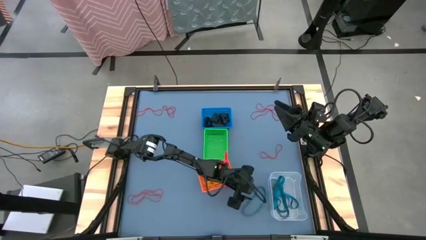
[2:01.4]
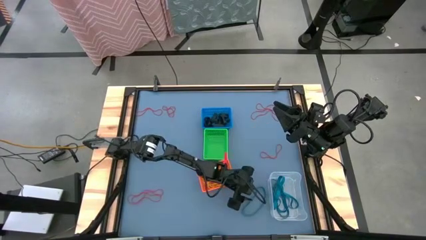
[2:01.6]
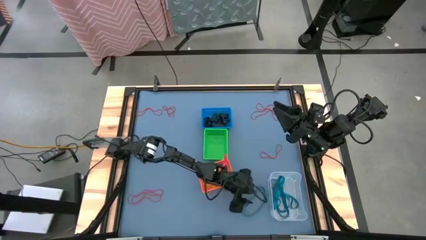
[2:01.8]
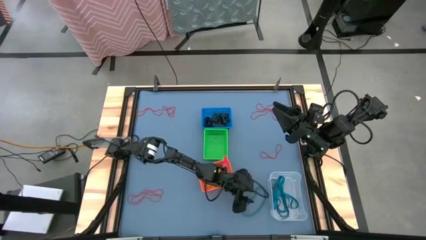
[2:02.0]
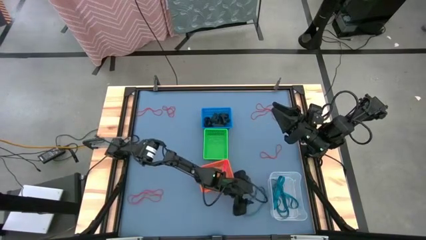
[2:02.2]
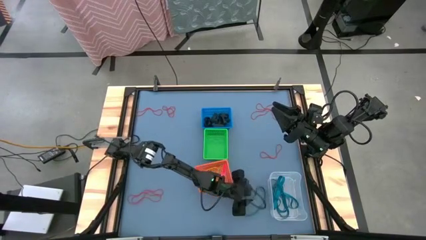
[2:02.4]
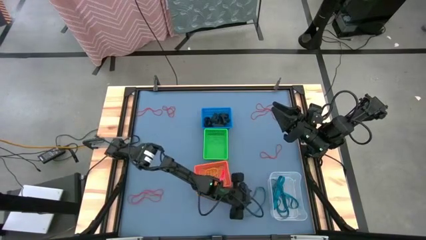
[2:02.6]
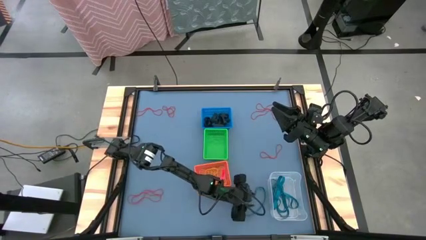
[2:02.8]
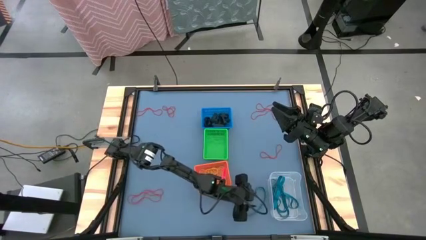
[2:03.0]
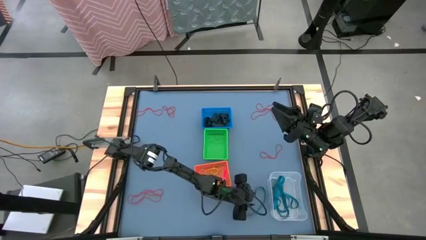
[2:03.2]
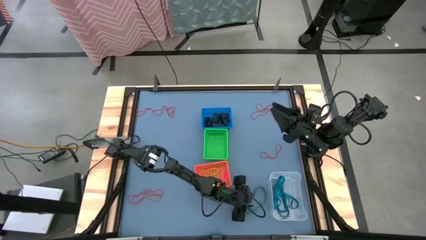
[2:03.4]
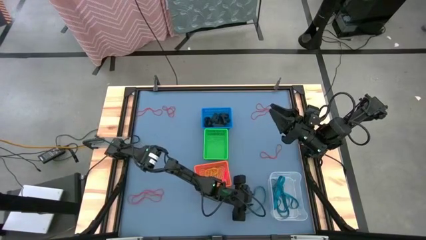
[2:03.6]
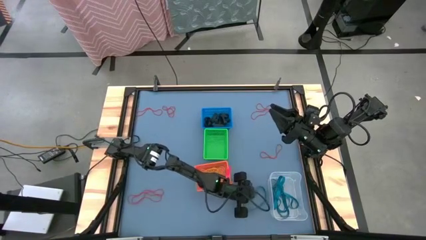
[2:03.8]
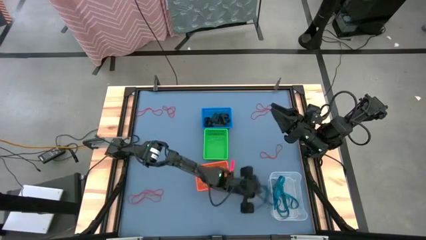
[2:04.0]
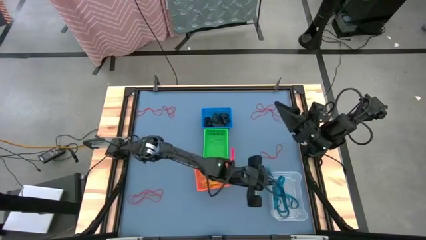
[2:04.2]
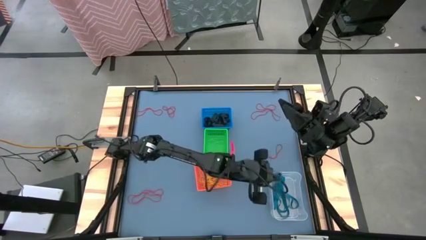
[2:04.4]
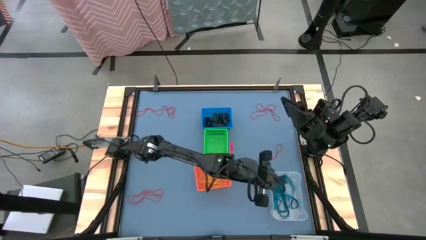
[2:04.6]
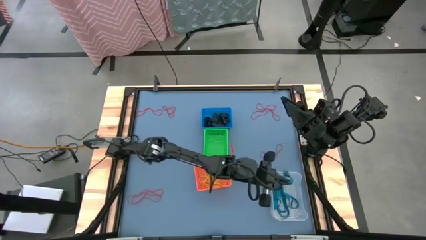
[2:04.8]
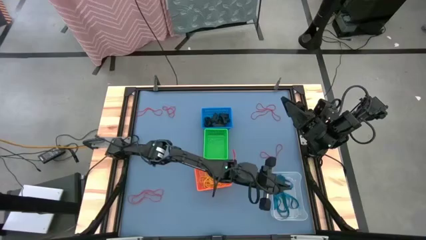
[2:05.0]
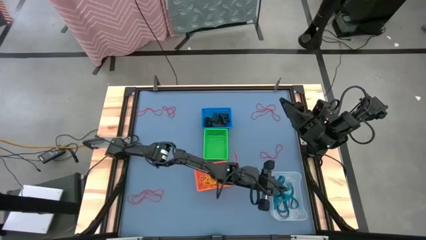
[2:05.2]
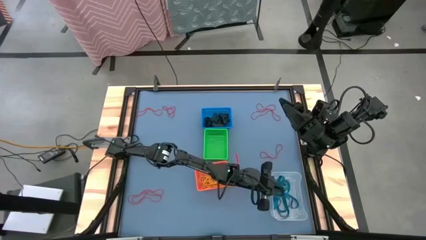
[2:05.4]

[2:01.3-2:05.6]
Task: Sort rubber bands into baskets
Put the blue rubber band into the transparent bin

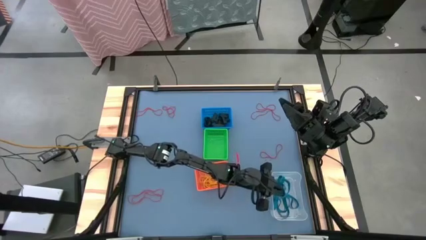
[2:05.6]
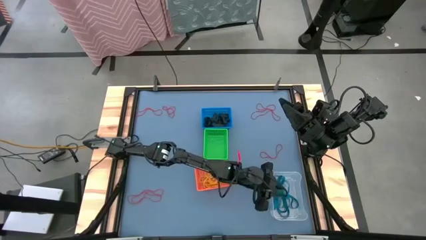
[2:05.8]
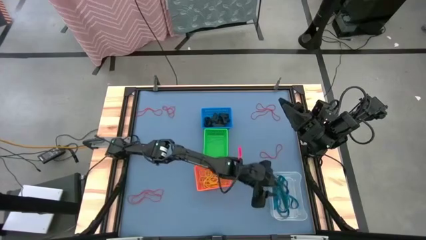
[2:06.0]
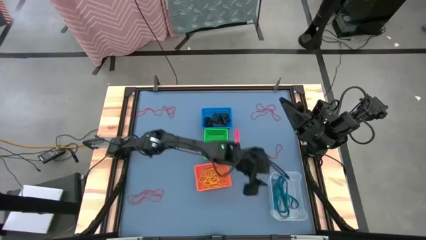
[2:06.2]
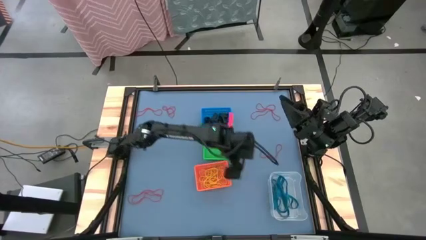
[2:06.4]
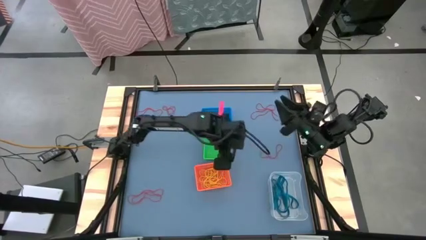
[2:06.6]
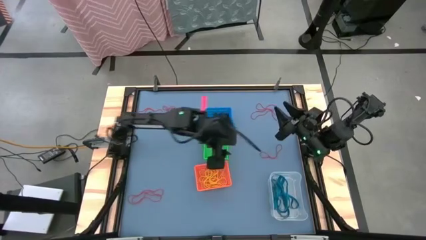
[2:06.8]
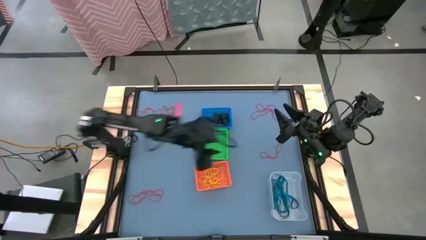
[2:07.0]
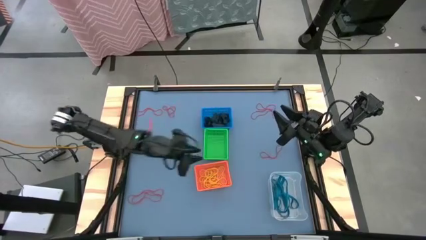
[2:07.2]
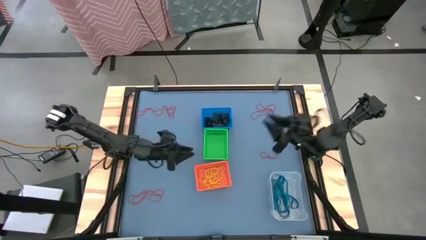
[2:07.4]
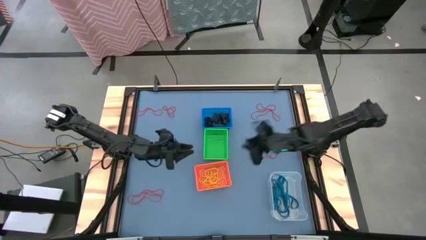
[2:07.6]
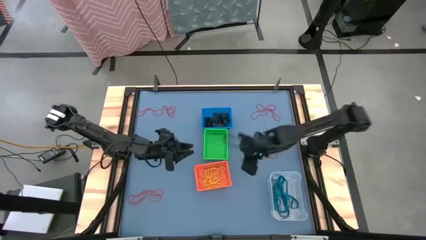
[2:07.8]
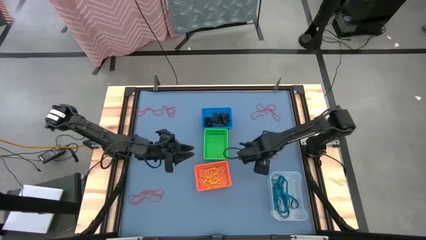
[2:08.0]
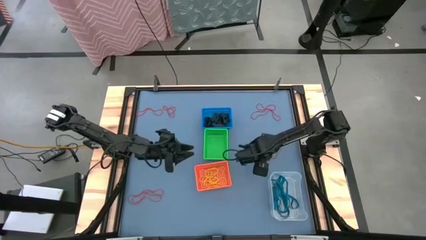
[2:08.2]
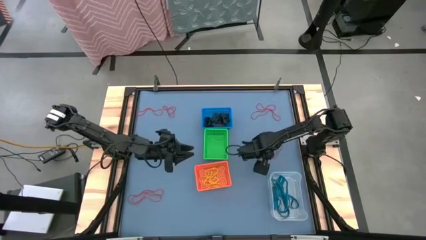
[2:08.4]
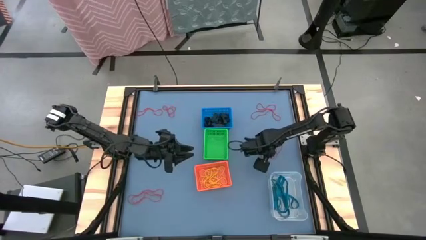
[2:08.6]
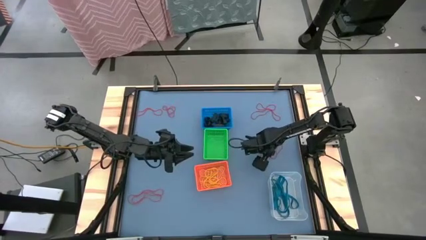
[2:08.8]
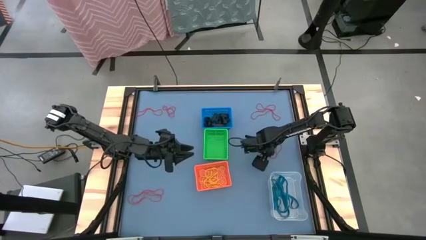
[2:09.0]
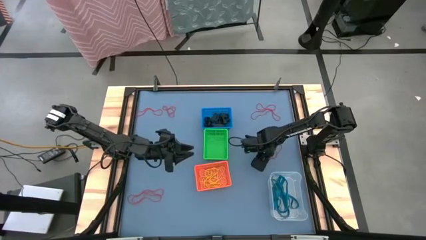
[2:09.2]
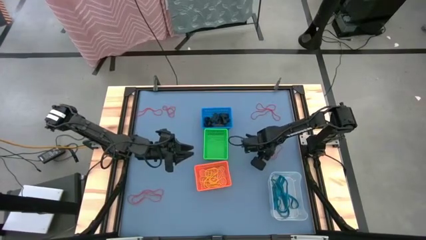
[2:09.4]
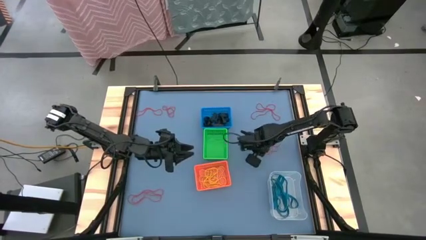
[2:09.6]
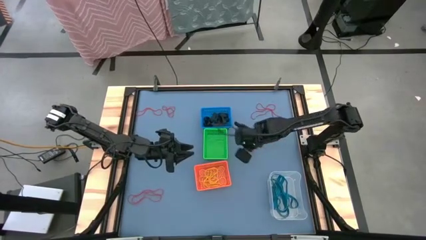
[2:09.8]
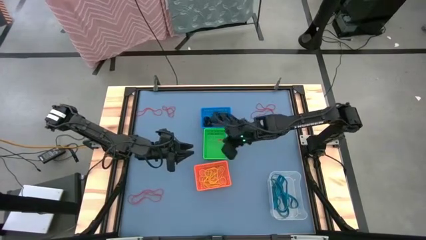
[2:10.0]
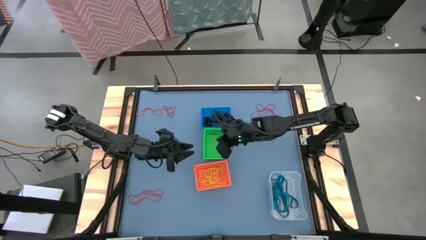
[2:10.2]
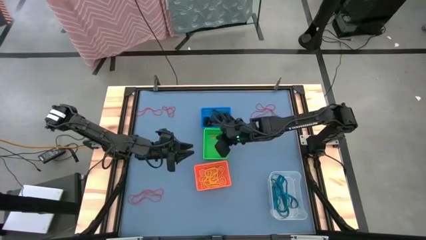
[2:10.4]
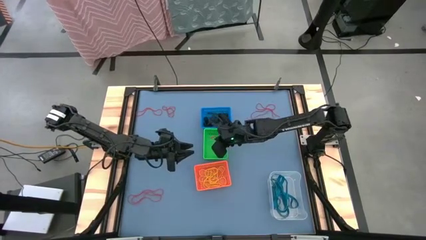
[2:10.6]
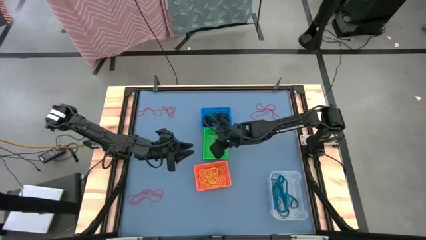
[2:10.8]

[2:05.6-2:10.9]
Put the red rubber band into the green bin

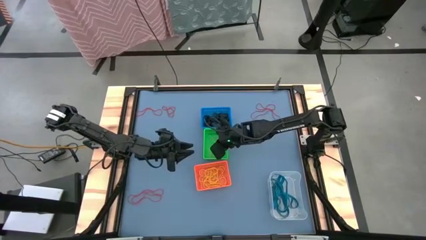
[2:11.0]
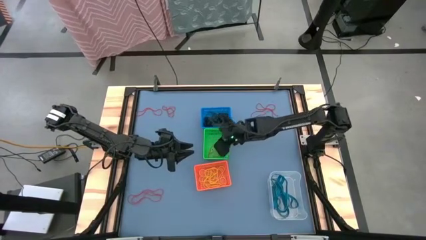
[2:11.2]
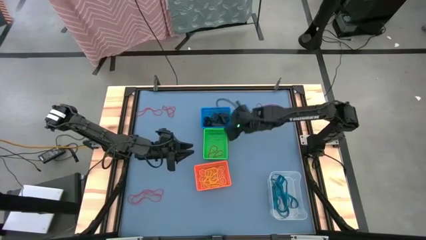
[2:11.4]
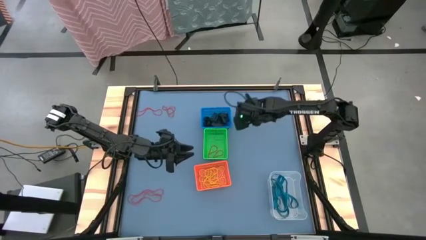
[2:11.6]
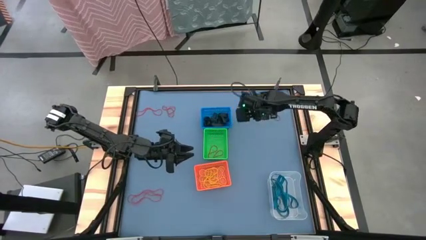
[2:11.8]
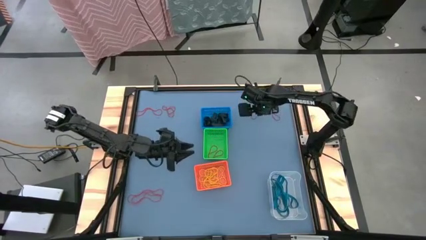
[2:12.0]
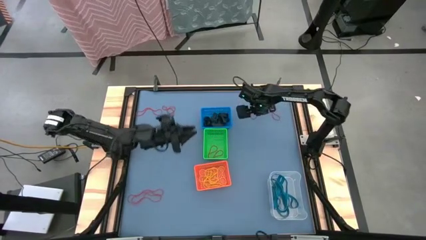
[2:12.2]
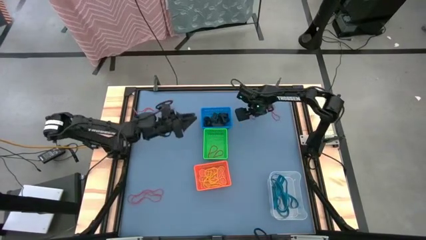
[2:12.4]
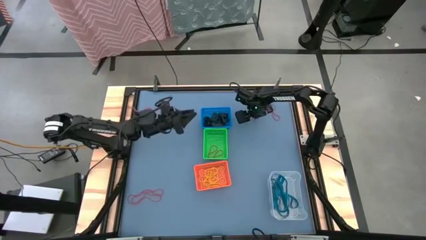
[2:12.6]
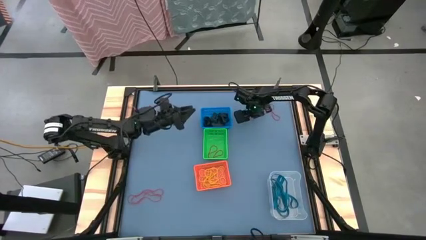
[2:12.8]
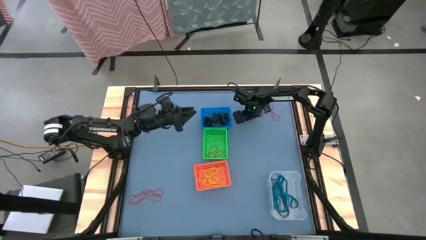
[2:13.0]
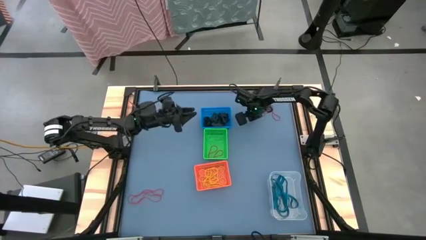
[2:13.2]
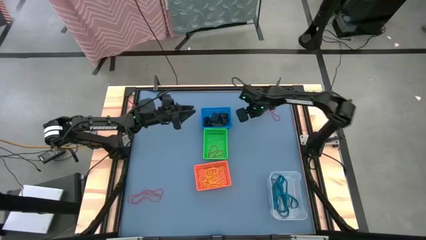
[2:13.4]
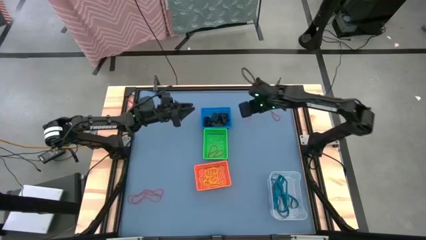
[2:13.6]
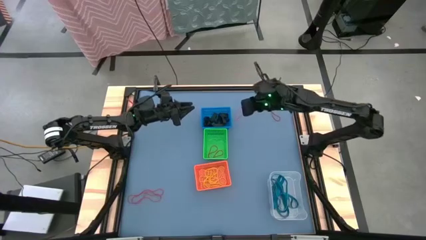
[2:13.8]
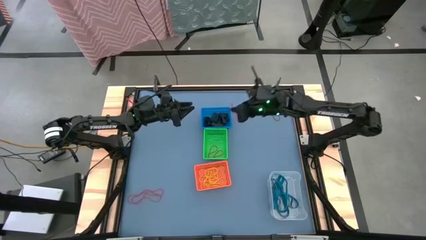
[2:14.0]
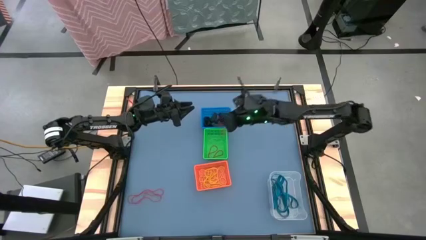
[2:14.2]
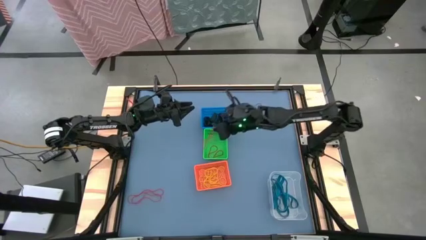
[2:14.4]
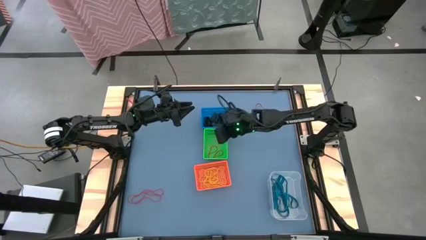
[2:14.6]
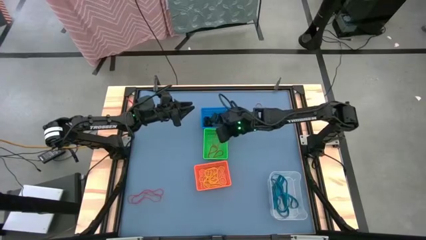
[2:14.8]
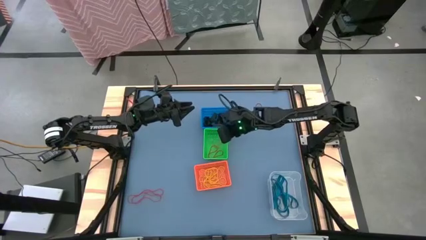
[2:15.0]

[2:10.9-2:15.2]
Put the red rubber band into the green bin

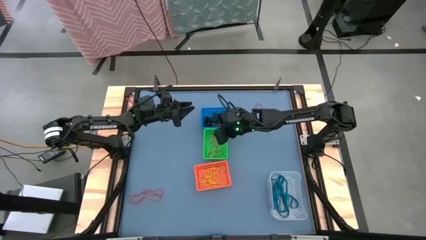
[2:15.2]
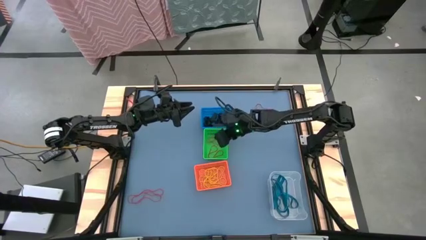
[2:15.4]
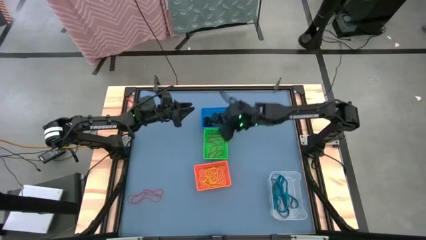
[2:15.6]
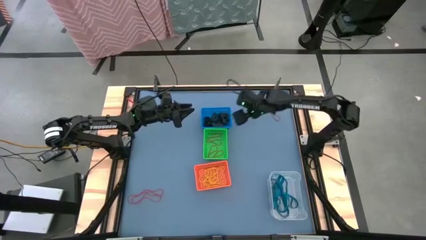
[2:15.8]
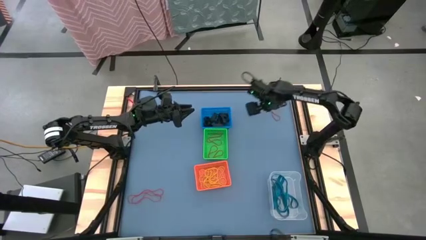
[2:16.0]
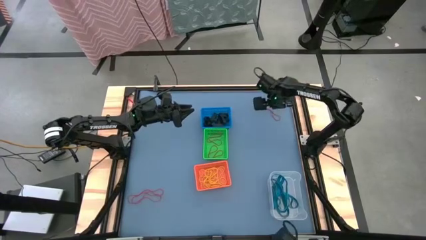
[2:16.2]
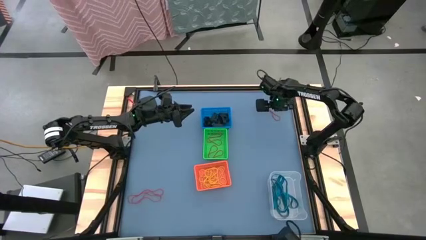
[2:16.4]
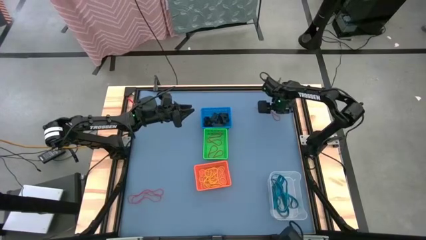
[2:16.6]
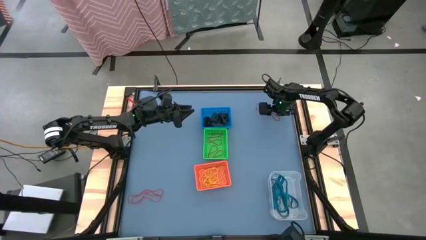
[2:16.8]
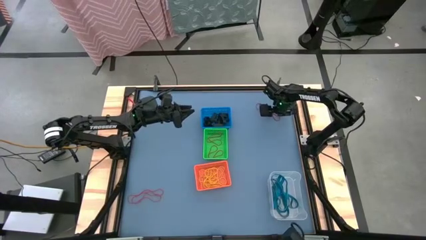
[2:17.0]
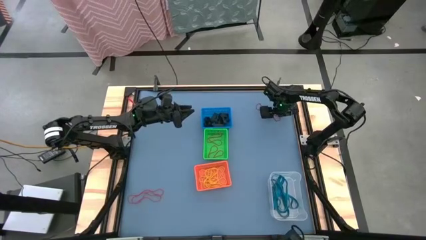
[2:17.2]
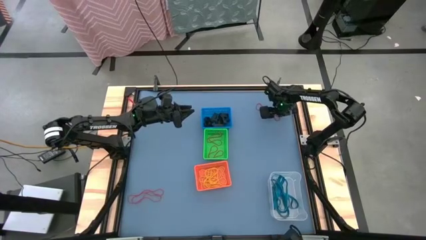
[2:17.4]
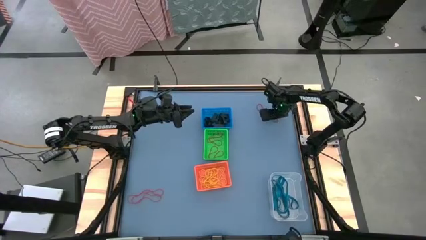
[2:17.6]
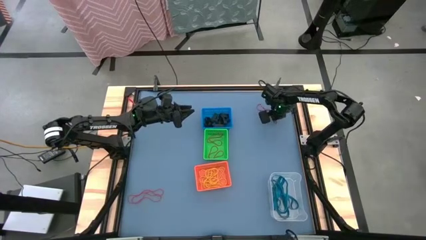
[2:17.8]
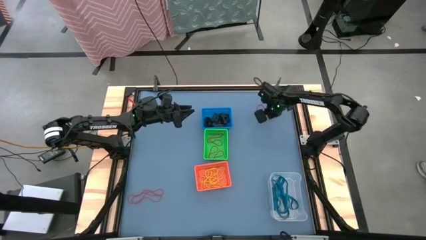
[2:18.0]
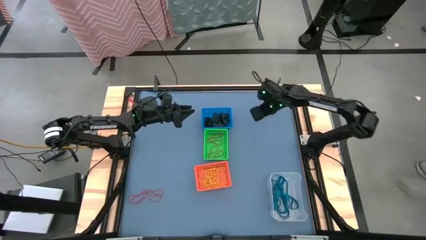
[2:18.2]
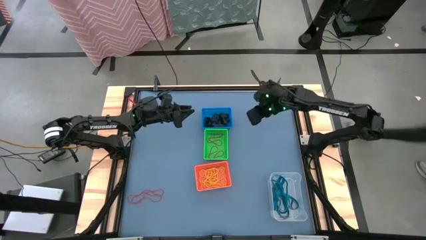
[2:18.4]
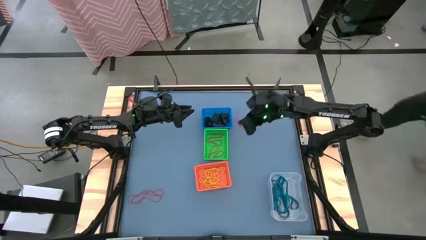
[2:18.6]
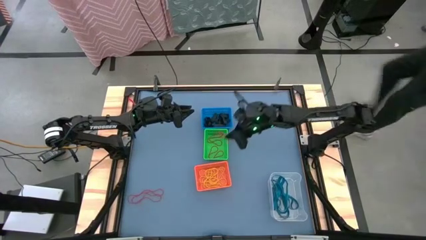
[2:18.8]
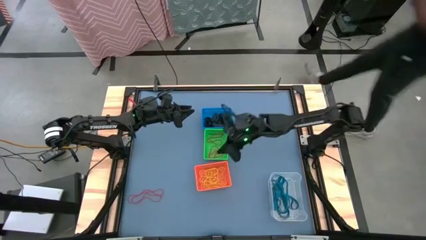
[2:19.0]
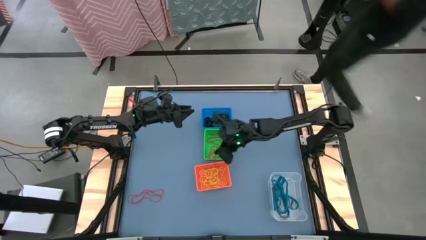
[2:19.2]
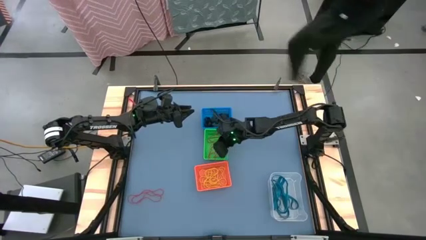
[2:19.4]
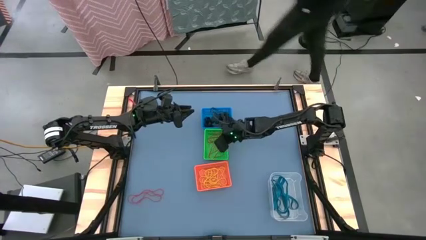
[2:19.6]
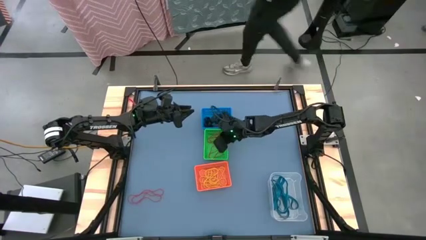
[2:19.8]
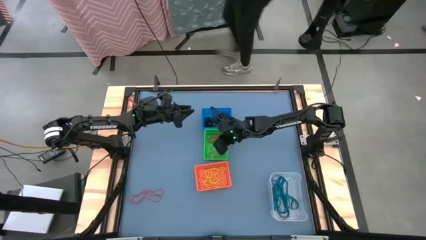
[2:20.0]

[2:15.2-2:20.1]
Put the red rubber band into the green bin
